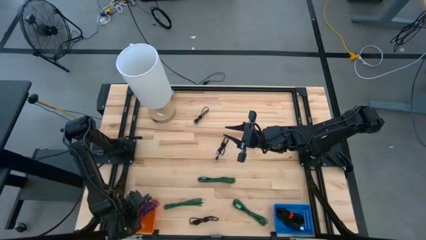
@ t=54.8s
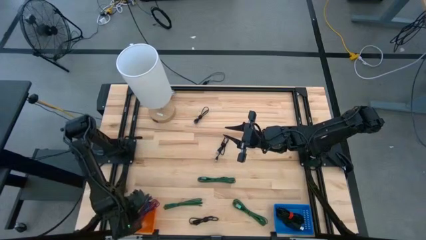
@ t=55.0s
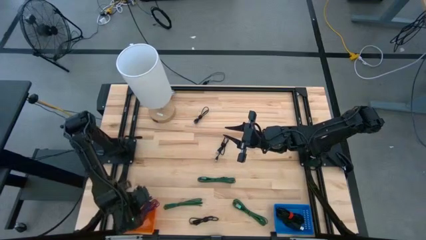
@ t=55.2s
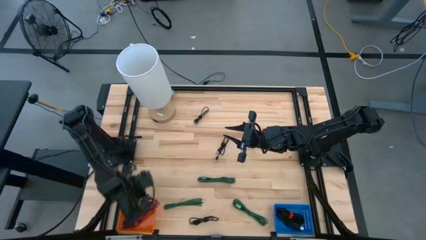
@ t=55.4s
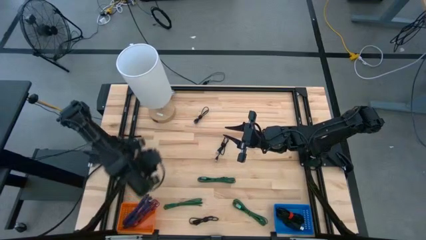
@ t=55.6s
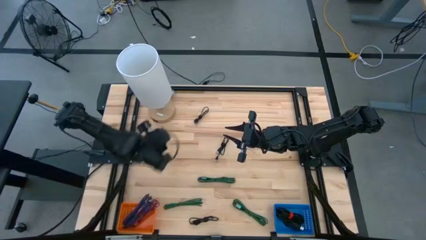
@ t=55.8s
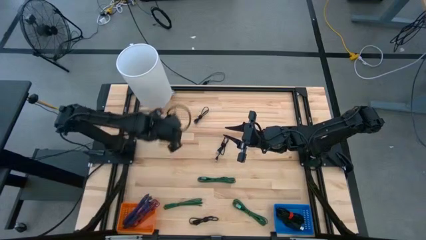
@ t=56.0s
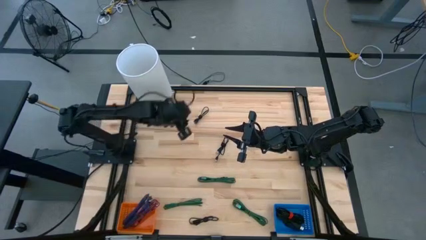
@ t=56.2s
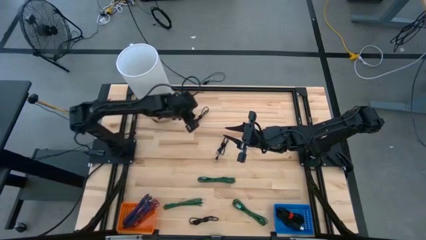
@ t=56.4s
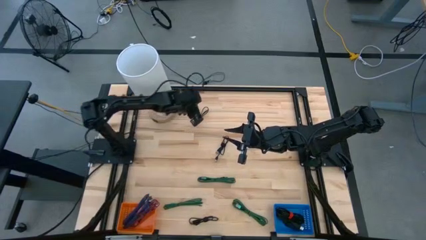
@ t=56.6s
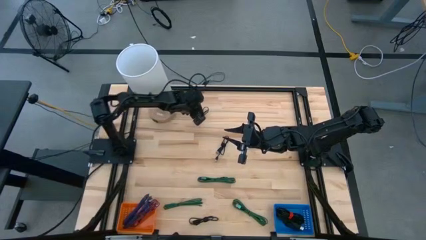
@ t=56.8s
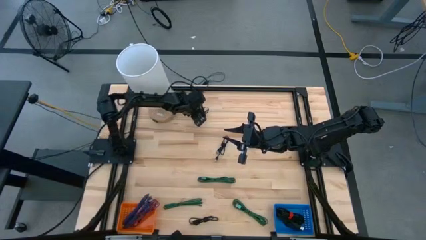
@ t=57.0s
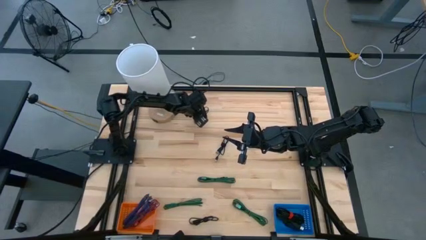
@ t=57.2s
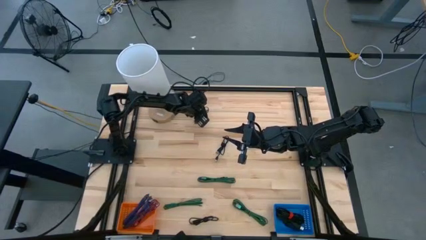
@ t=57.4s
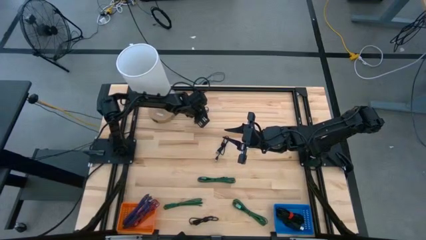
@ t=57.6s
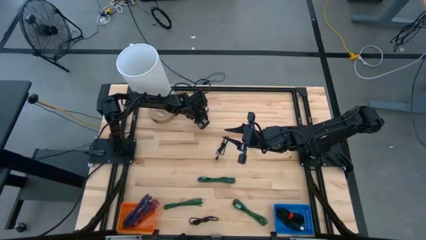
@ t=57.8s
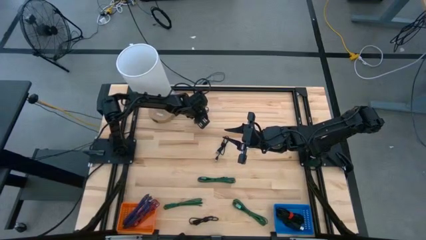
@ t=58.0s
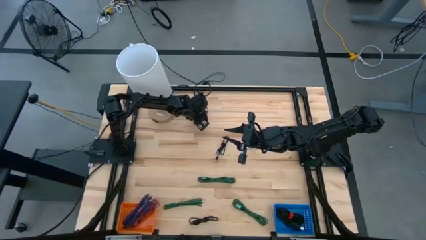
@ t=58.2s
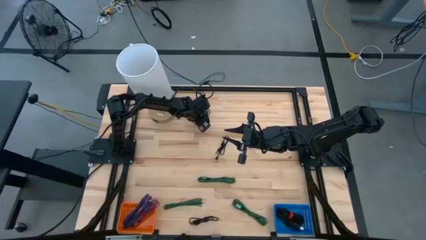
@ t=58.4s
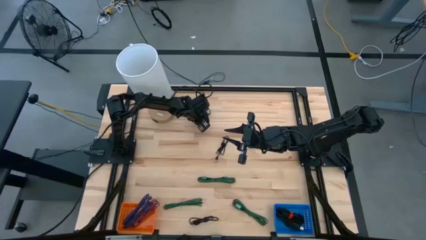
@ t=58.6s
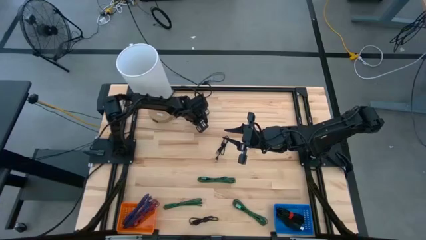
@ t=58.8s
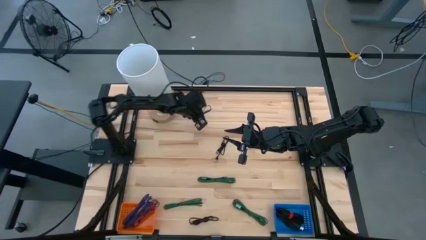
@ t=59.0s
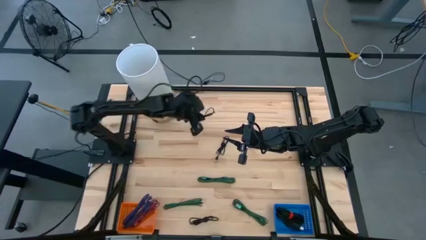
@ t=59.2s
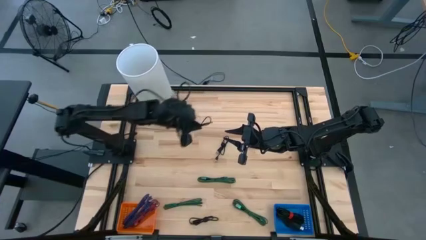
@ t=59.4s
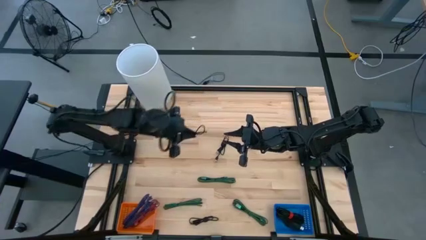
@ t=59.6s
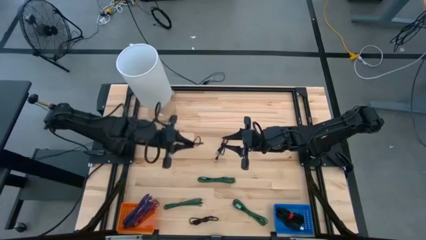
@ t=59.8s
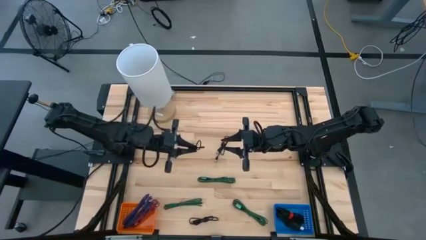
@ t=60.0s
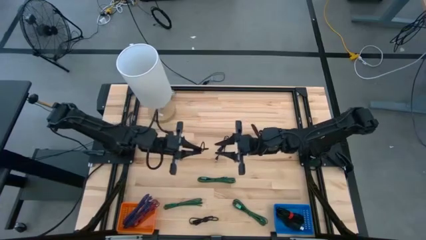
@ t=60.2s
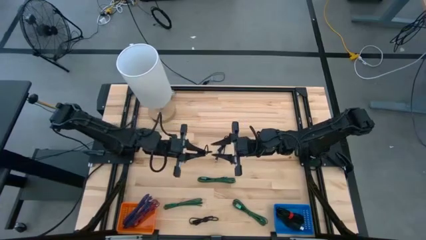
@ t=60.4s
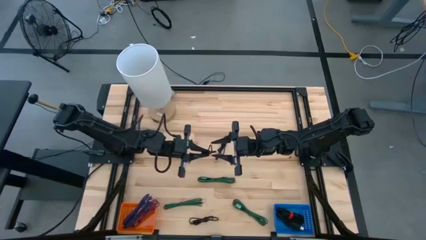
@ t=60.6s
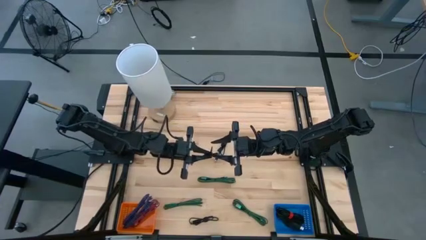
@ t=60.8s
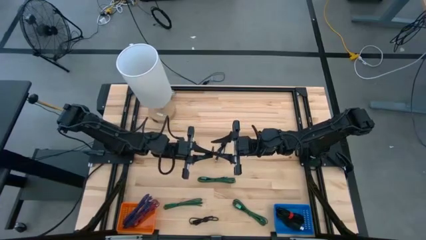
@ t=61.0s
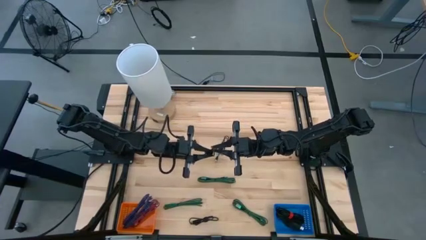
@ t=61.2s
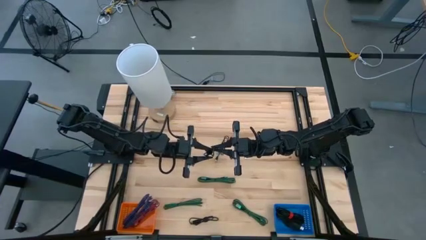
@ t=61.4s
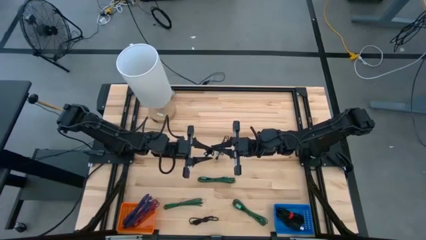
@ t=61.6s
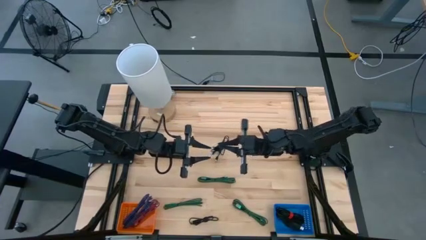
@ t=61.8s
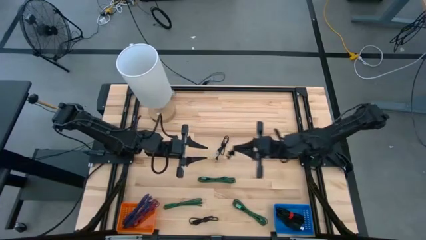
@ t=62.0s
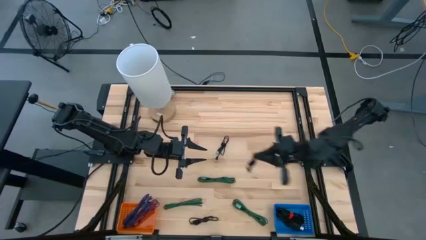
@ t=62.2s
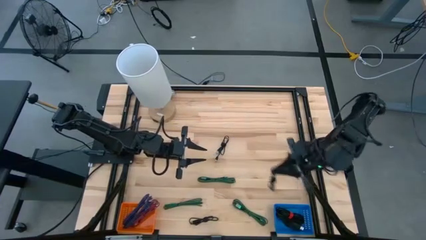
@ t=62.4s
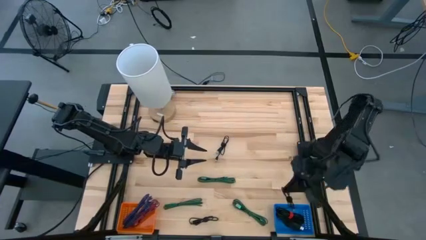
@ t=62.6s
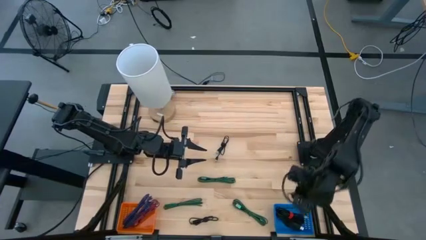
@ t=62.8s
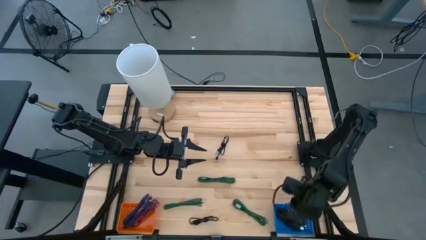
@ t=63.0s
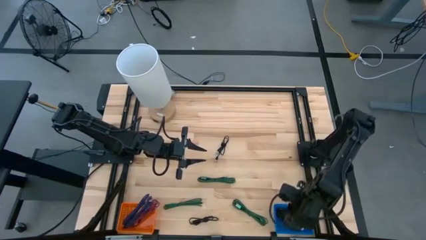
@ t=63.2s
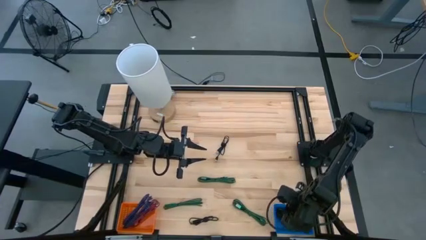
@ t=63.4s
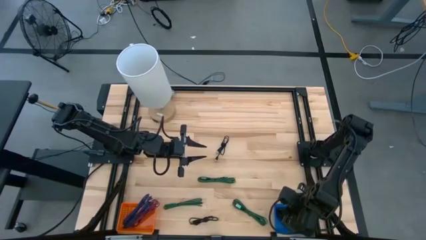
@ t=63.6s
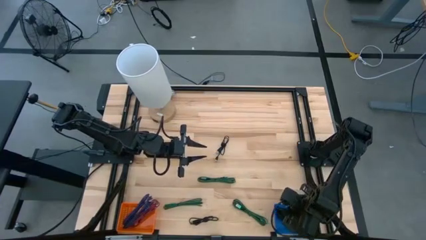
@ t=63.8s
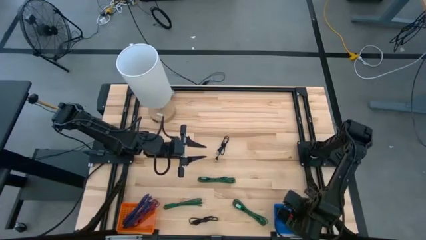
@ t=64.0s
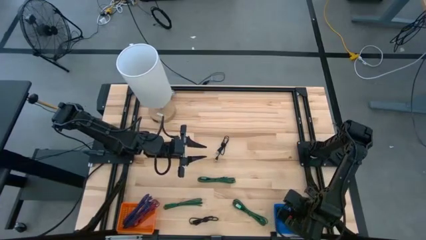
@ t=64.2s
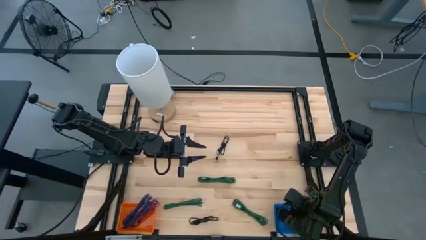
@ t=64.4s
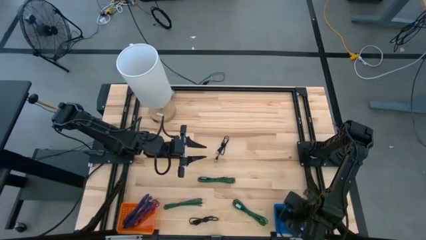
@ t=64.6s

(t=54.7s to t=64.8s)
Task: Pick & Place USB Port
Put the black charger cable into the blue bin

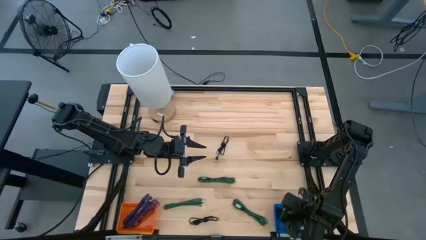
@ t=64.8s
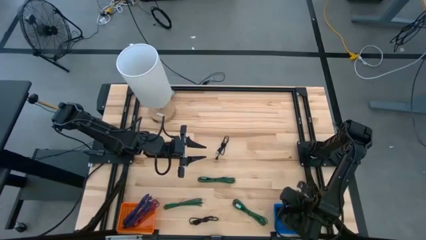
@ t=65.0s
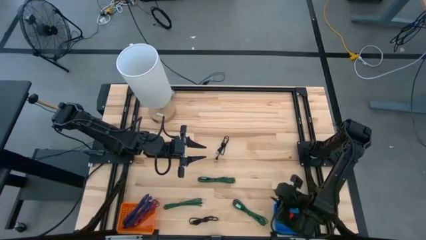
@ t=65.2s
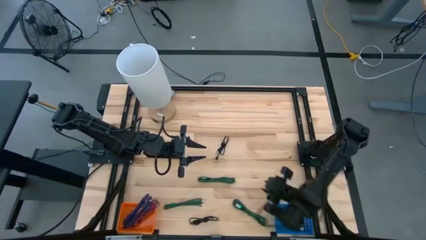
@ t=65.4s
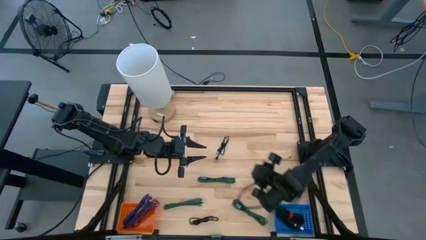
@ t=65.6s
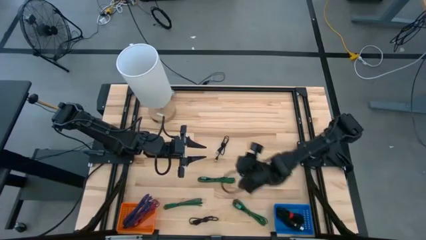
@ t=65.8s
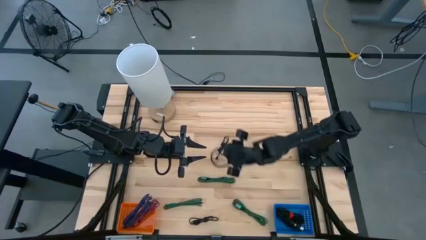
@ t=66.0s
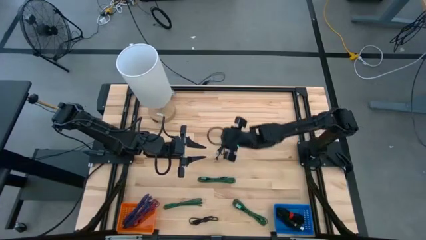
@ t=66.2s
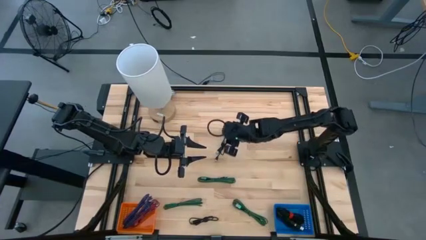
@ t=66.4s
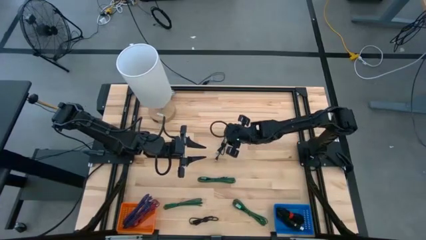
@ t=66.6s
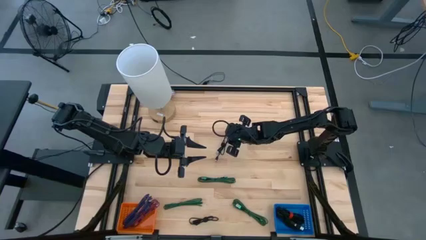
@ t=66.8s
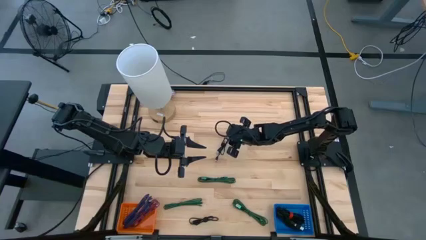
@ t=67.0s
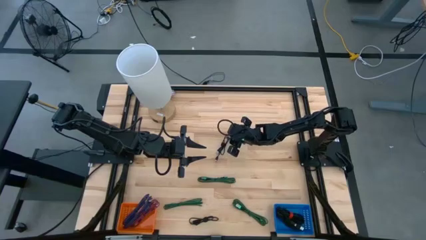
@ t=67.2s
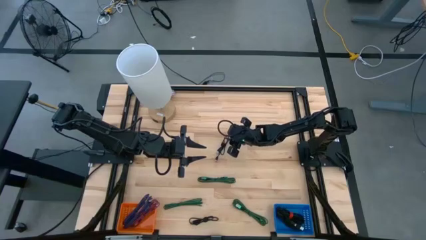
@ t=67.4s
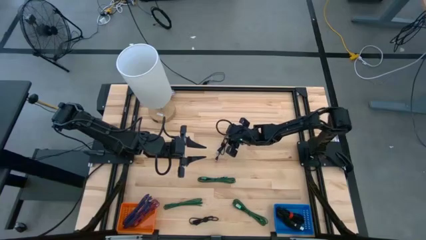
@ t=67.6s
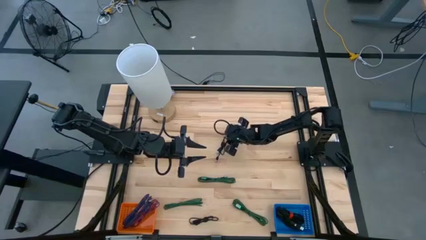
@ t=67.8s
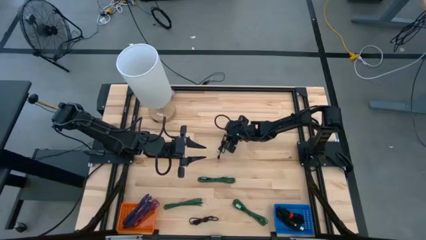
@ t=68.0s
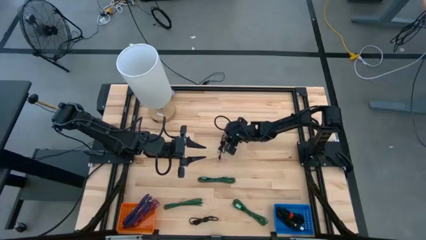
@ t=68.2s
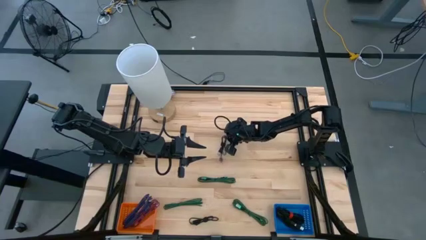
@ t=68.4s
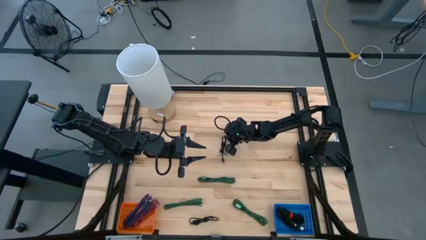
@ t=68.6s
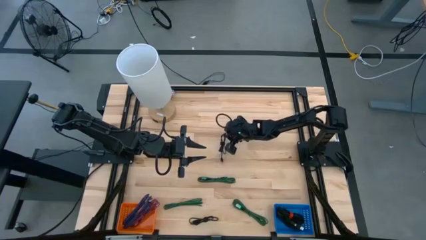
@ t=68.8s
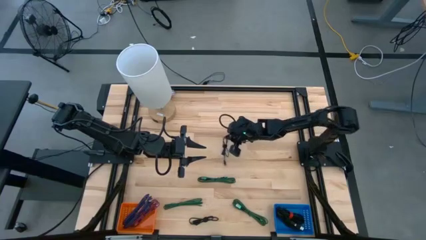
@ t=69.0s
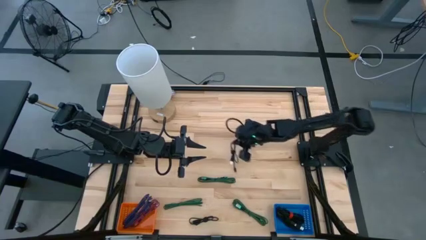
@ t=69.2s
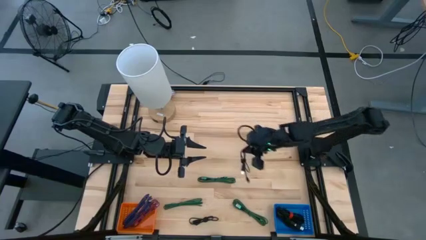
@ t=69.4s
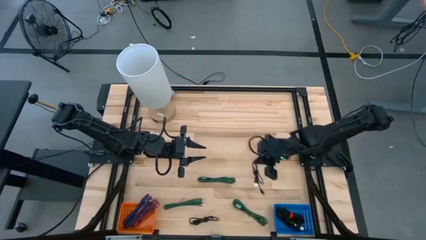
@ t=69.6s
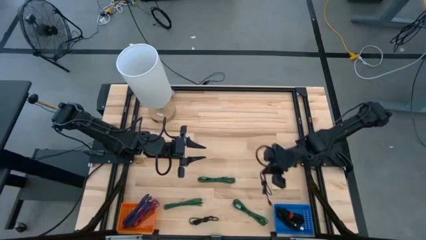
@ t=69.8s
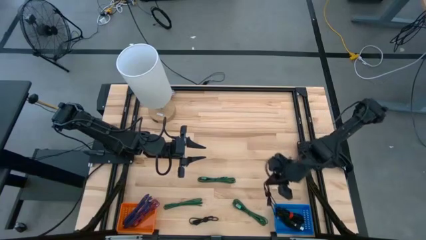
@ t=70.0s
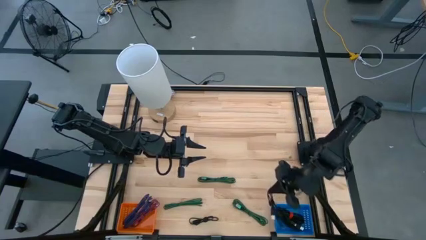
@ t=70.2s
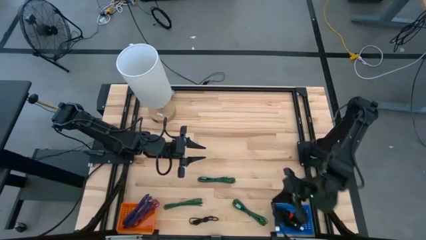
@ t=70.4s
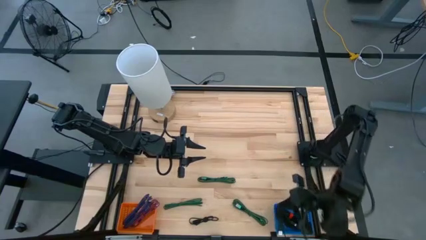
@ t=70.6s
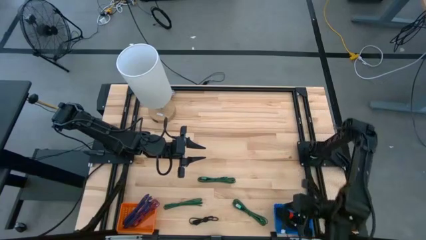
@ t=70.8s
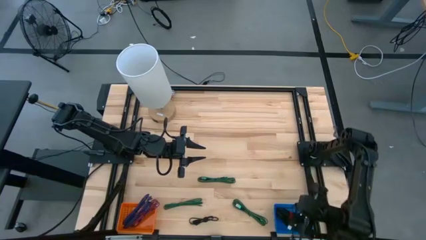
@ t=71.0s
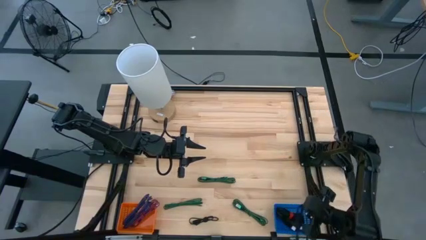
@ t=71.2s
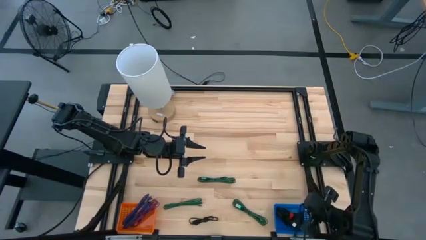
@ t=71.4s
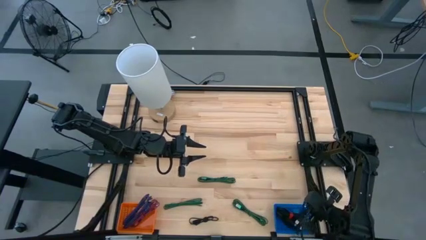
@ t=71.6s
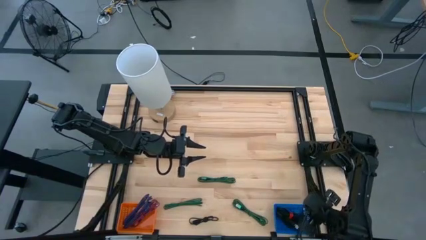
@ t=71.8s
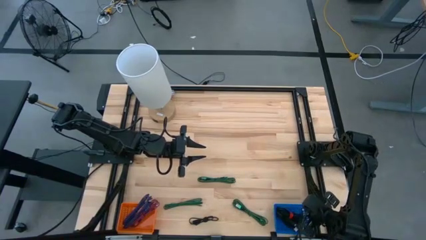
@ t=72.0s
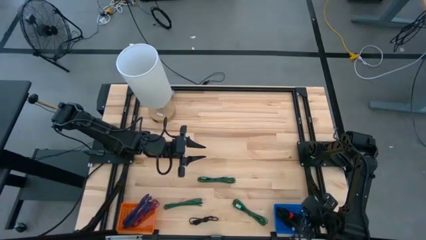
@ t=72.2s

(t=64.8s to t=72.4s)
Put the black charger cable into the blue bin
